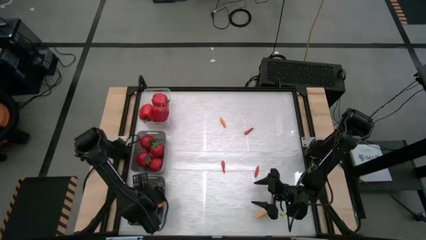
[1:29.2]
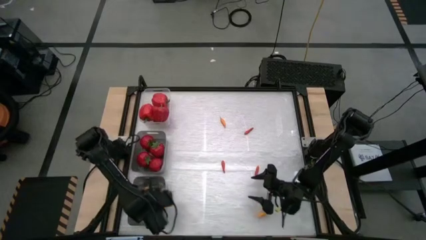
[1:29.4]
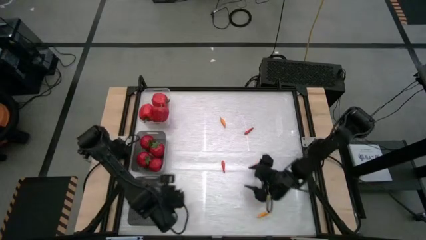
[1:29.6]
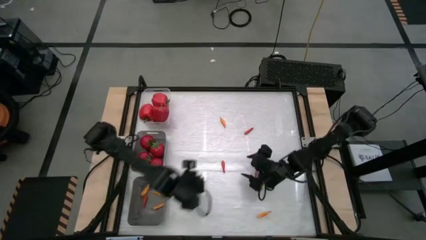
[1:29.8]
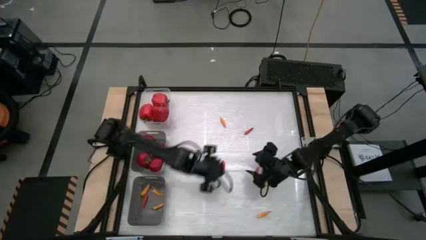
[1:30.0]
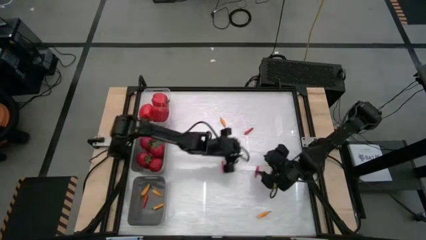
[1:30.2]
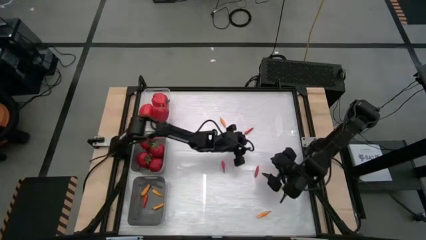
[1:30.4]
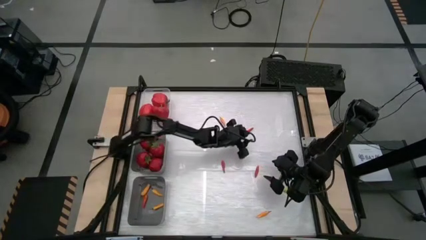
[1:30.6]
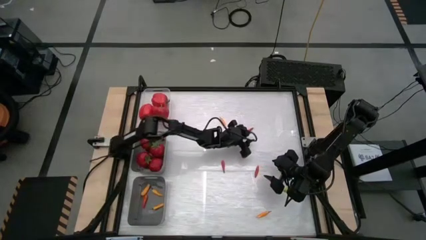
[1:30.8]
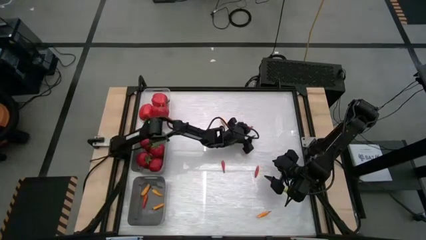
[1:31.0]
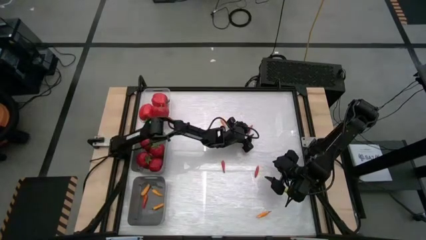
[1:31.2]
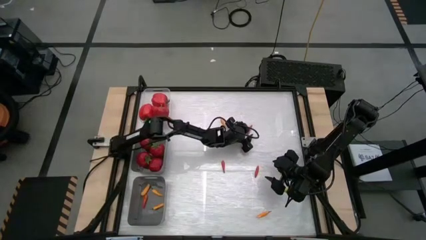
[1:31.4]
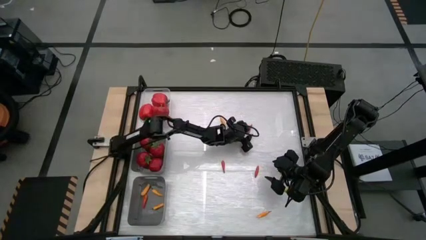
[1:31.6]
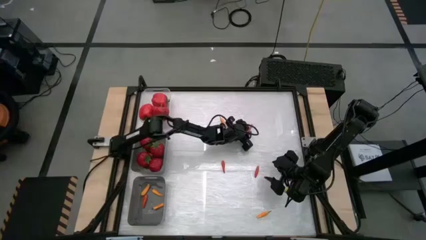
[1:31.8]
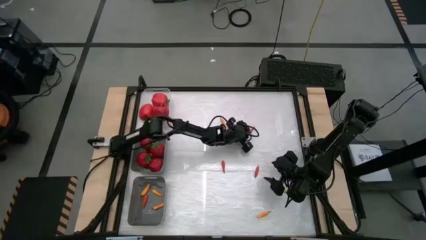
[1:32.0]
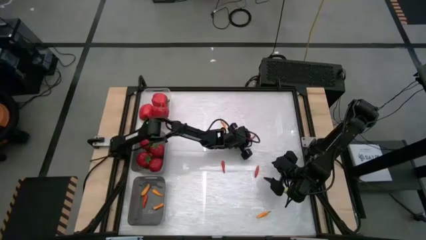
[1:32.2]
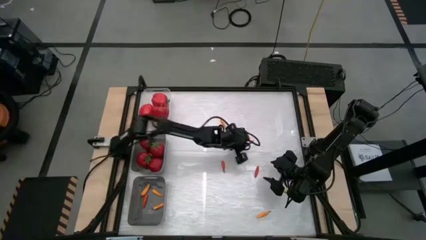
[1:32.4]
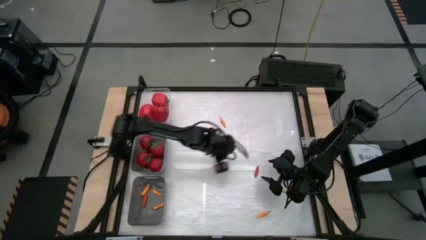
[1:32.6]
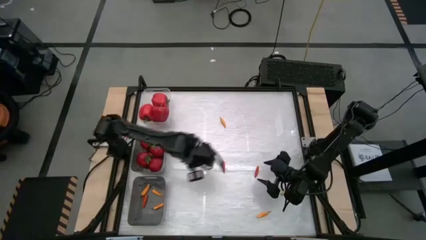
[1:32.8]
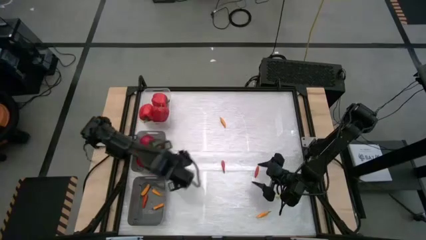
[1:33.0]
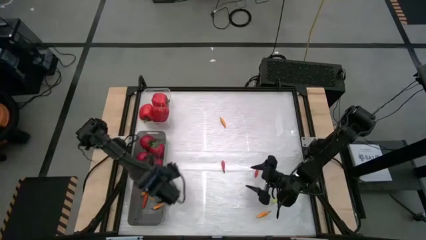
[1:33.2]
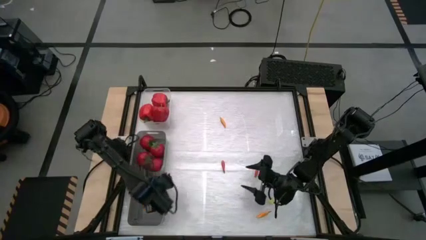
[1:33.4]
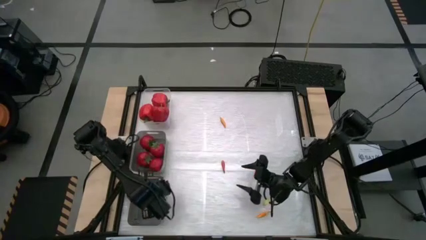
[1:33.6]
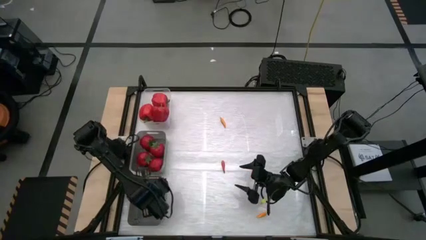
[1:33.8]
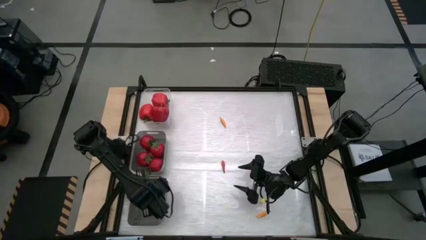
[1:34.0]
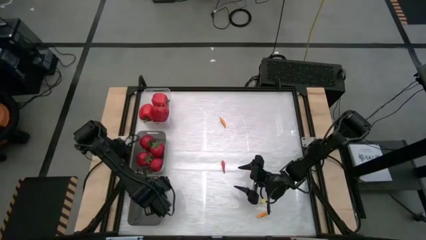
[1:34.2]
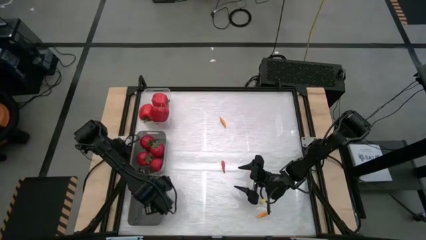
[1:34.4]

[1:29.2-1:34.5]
Task: Sort produce into baskets
Put the middle right red chili pepper into the bottom black transparent bin

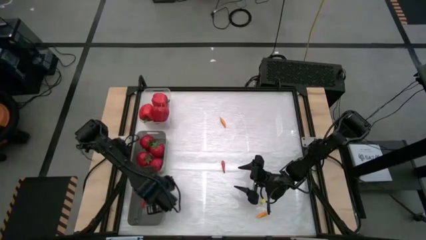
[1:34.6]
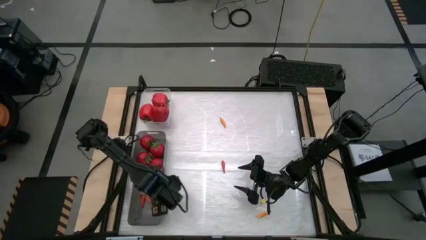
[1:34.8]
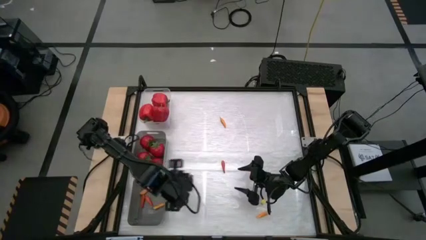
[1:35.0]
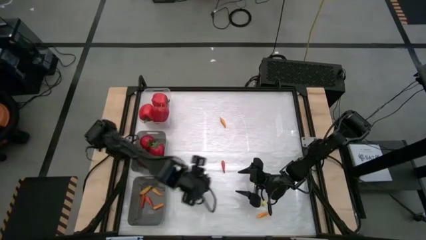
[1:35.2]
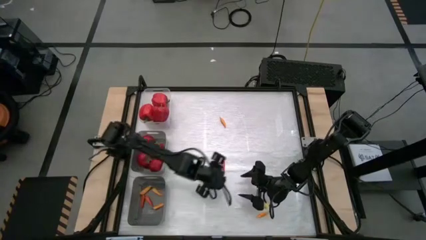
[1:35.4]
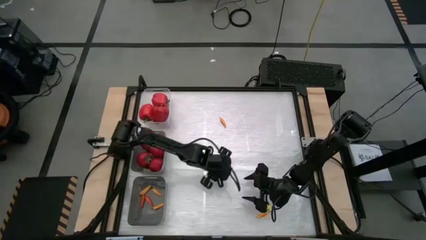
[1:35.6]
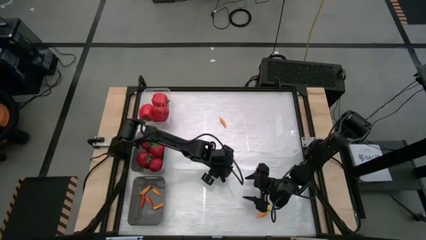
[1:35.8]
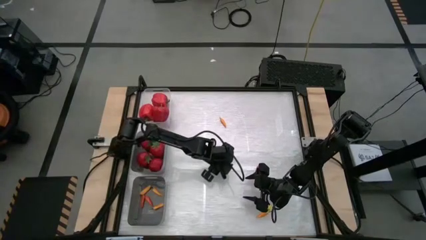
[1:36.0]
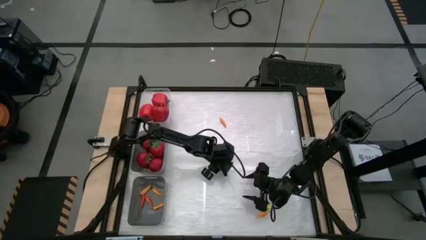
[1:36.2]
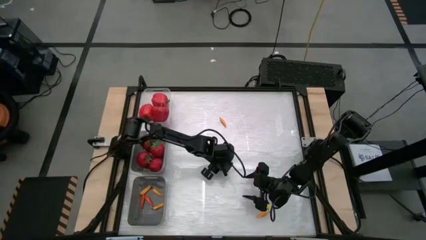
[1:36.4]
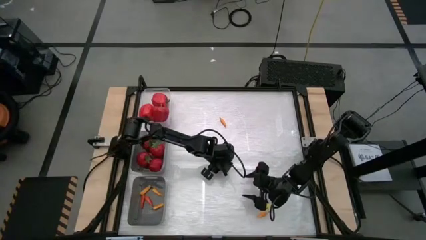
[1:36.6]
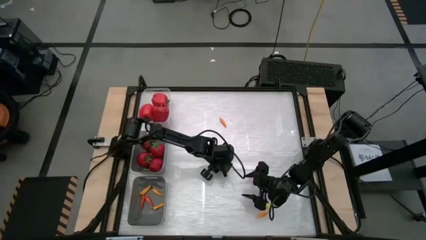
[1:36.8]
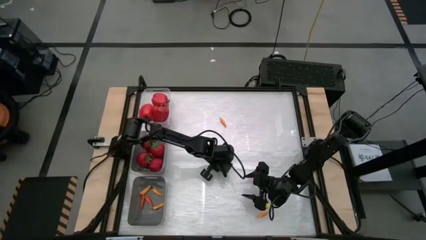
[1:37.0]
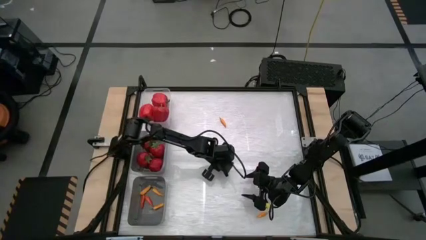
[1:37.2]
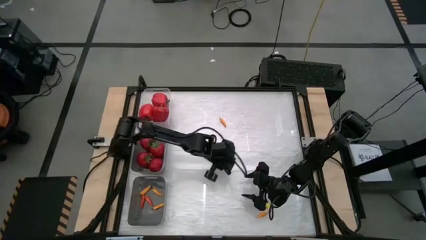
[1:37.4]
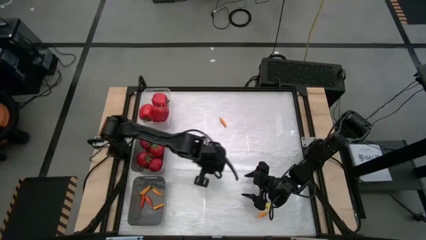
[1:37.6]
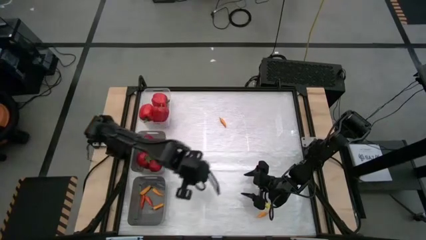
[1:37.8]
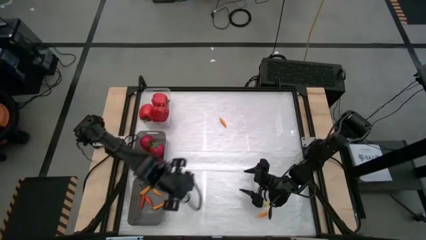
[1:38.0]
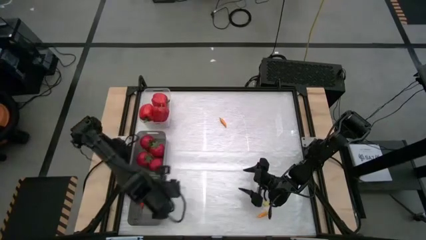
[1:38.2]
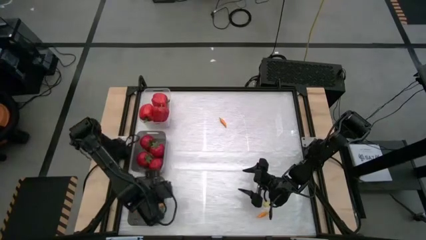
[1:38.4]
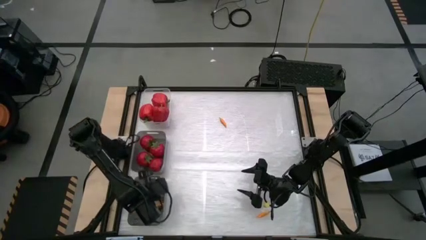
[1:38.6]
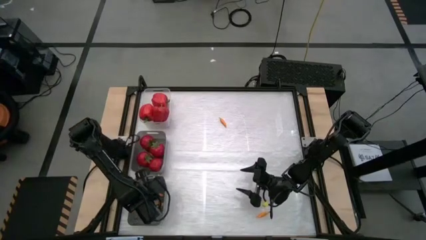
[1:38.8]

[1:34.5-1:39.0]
Put the left red chili pepper into the bottom black transparent bin

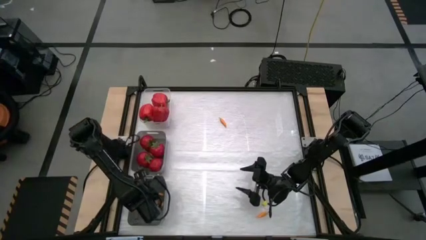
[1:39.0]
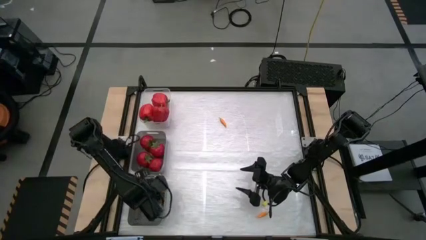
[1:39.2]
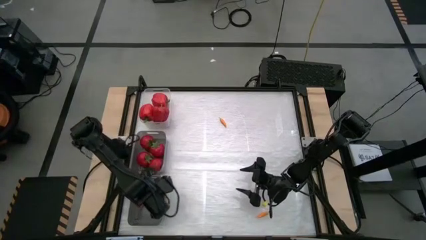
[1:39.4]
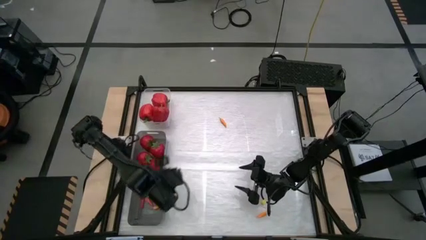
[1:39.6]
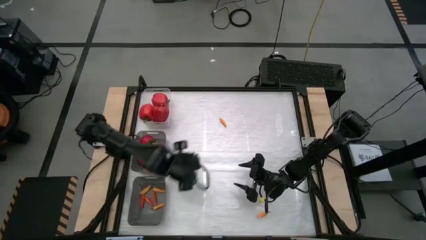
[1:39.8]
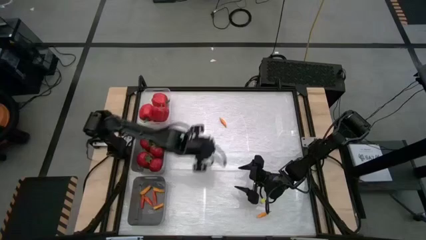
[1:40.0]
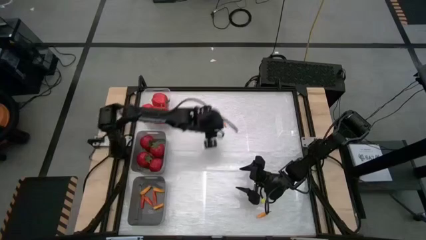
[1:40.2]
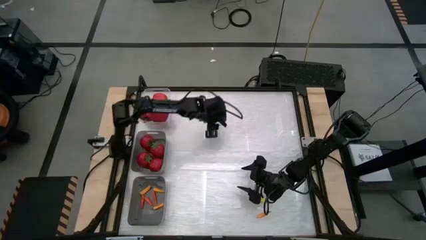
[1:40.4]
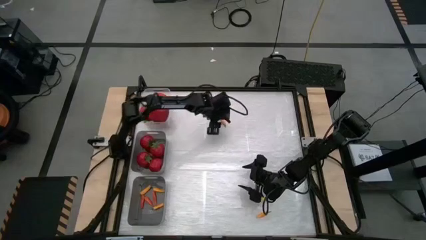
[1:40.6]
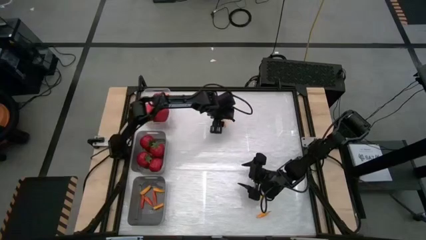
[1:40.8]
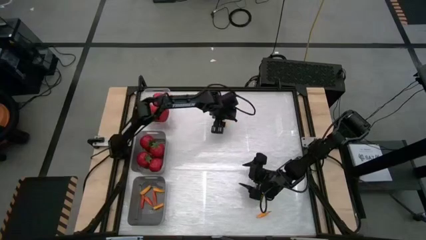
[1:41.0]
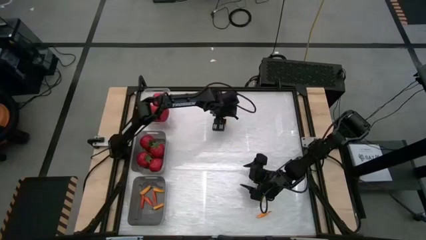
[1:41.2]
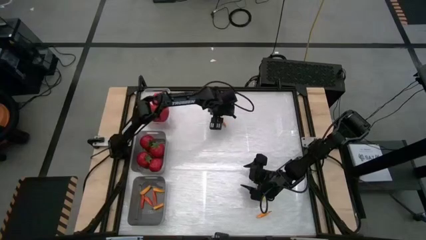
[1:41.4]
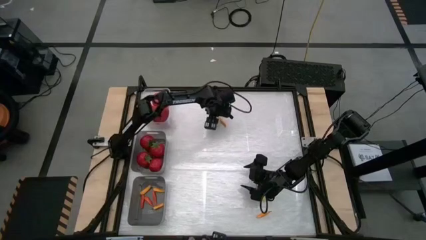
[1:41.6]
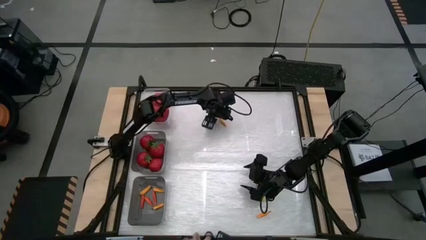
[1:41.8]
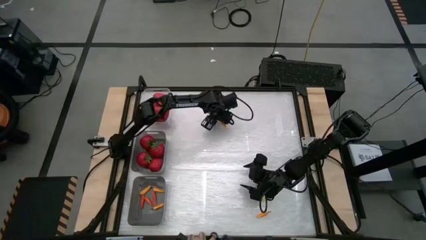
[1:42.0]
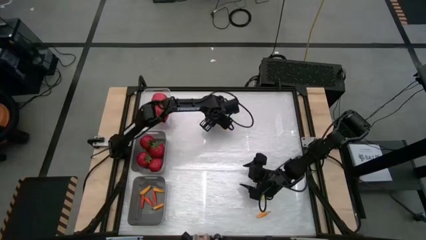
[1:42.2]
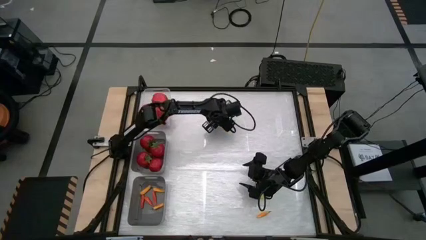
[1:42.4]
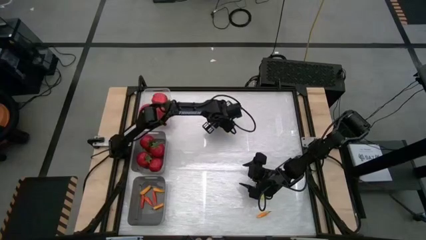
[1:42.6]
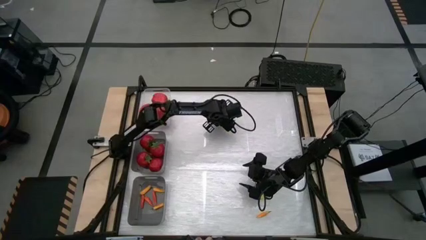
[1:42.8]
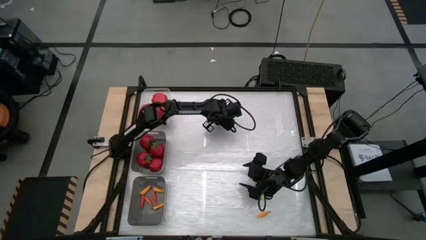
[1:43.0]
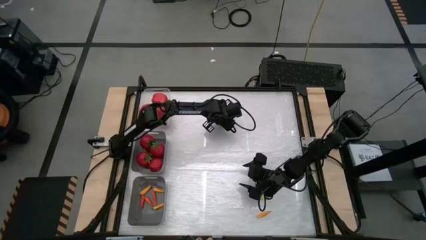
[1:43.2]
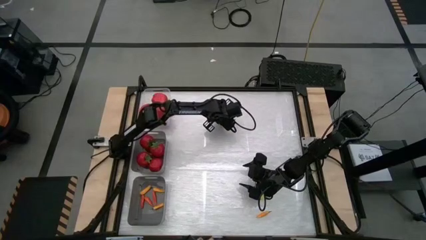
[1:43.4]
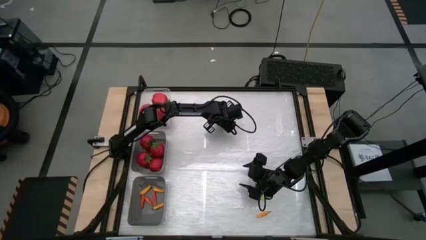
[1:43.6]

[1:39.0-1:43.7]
Put the top orange chili pepper into the bottom black transparent bin

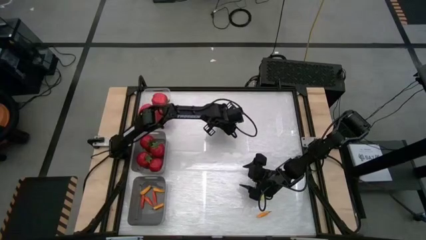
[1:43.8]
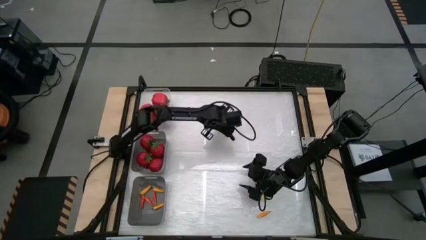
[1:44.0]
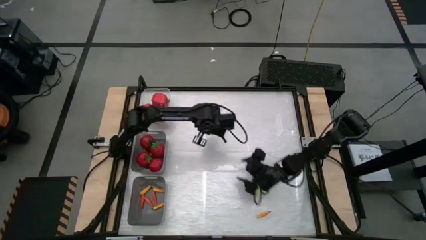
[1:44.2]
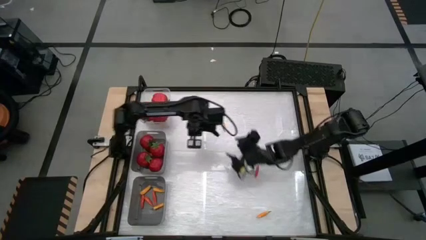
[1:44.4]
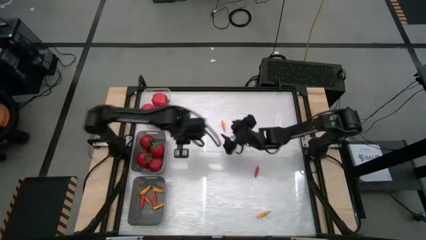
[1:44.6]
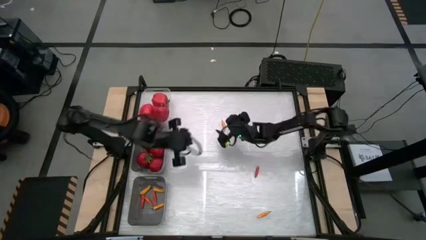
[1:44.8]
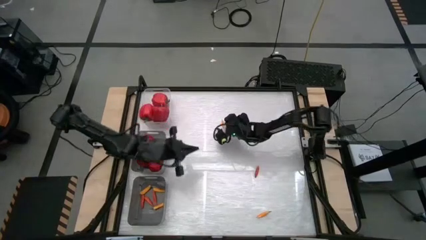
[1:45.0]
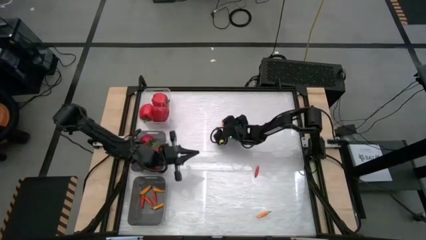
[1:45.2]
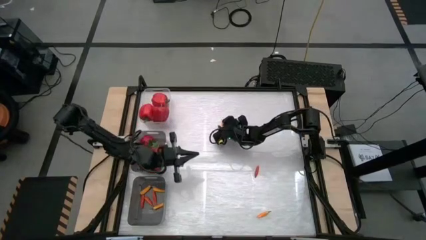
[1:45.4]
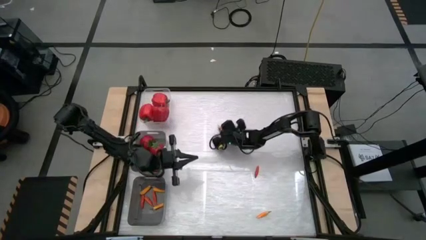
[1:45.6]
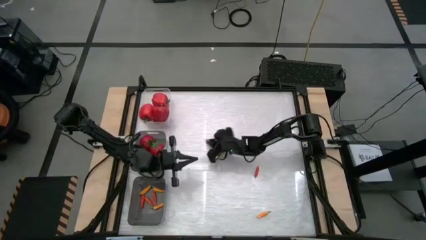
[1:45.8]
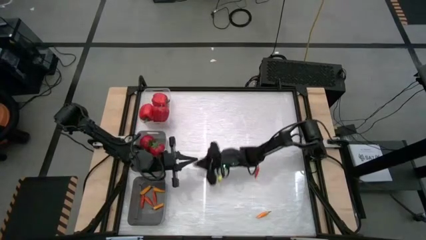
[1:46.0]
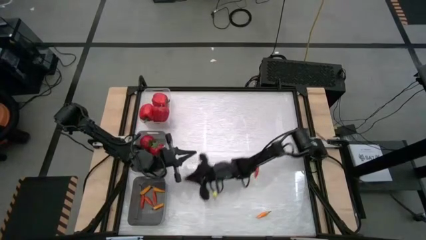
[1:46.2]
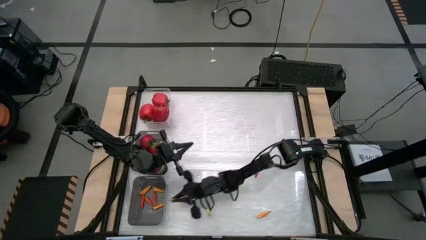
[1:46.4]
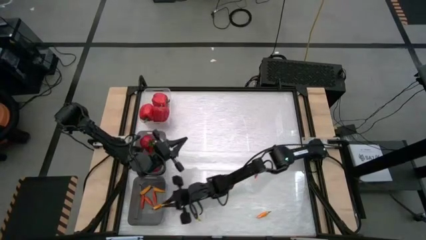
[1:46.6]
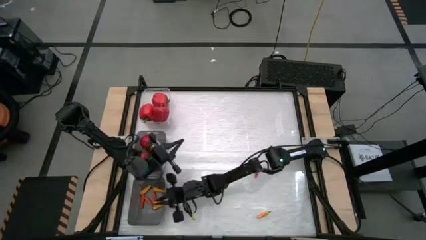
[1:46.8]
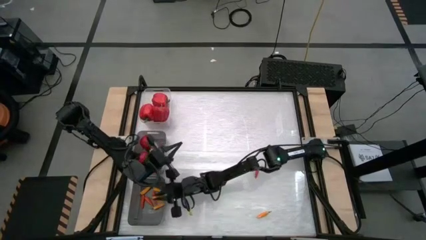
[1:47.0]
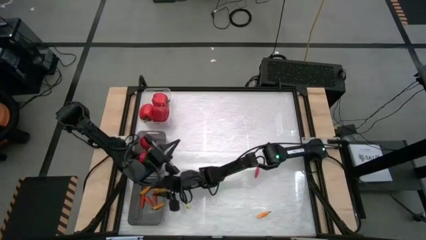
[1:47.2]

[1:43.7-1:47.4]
Put the top orange chili pepper into the bottom black transparent bin
